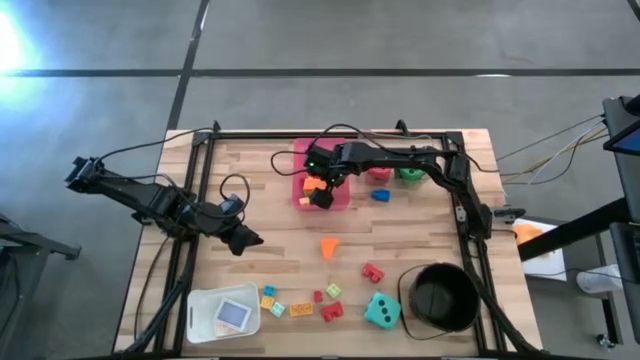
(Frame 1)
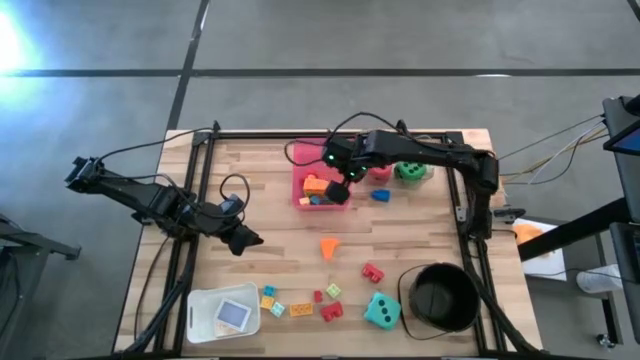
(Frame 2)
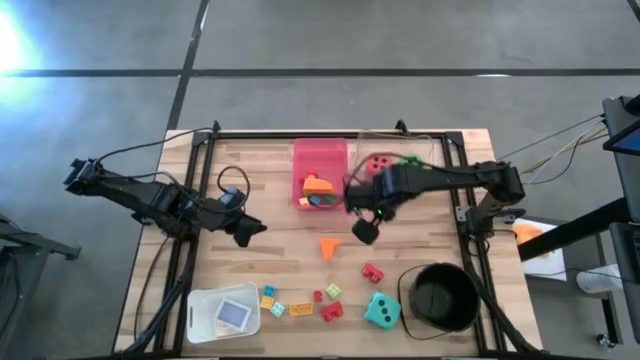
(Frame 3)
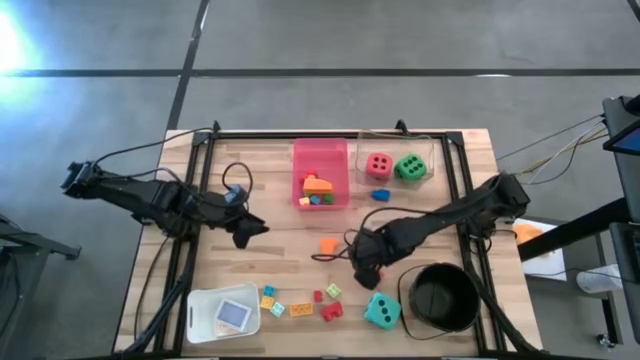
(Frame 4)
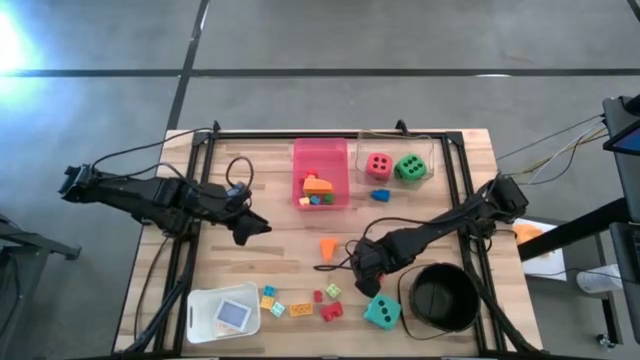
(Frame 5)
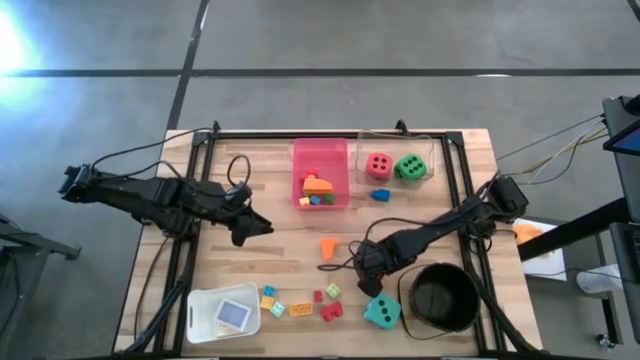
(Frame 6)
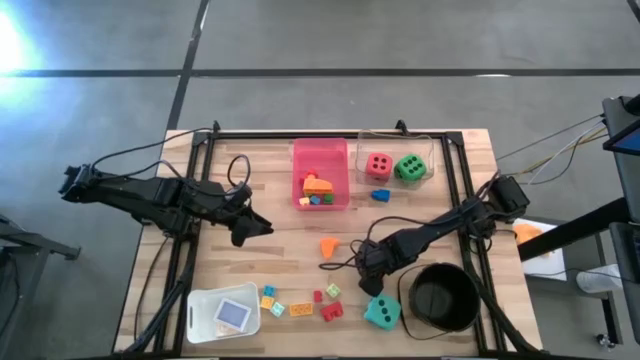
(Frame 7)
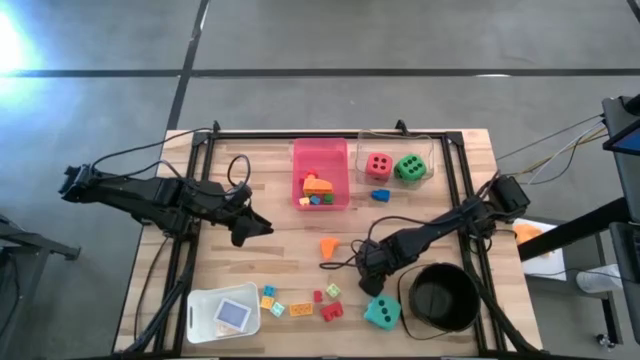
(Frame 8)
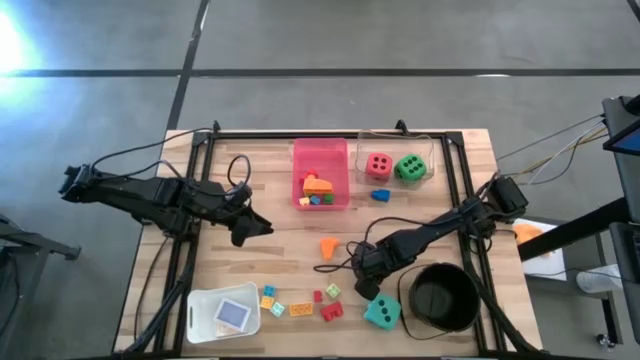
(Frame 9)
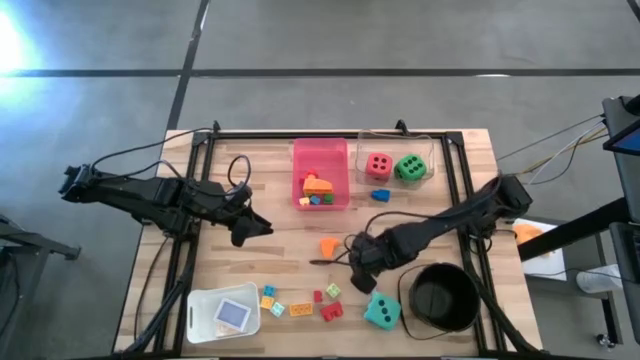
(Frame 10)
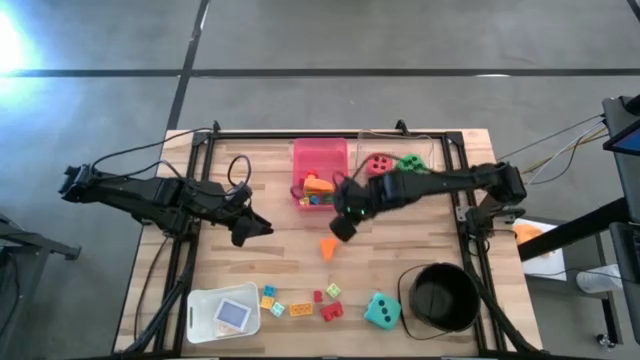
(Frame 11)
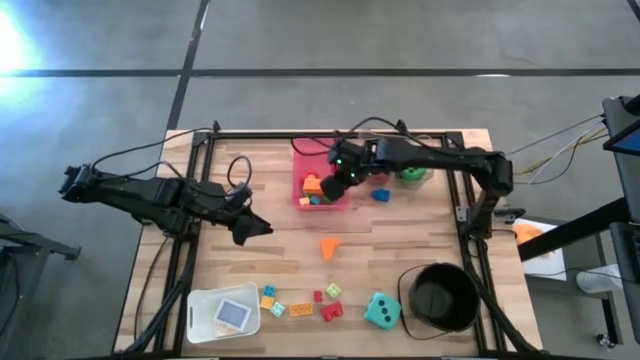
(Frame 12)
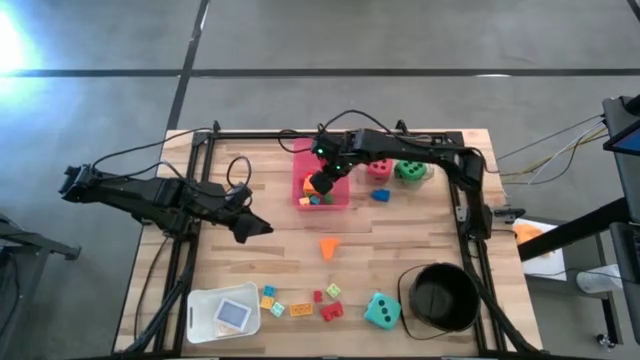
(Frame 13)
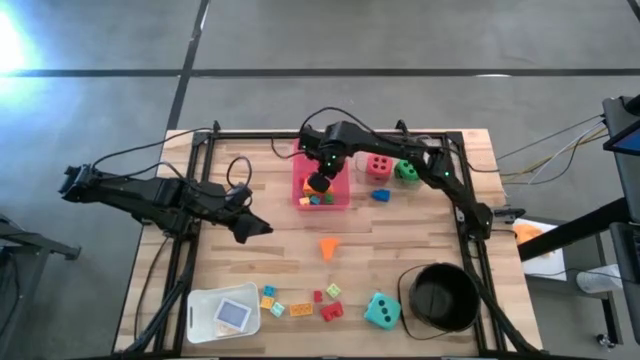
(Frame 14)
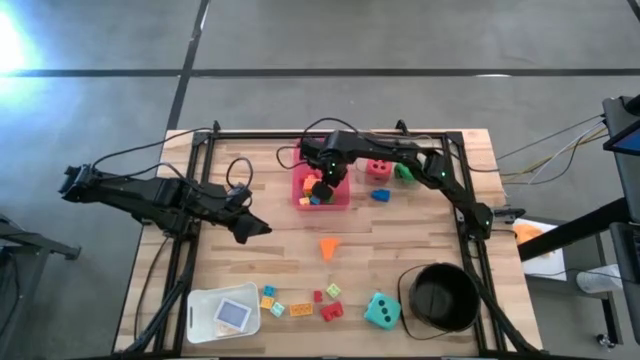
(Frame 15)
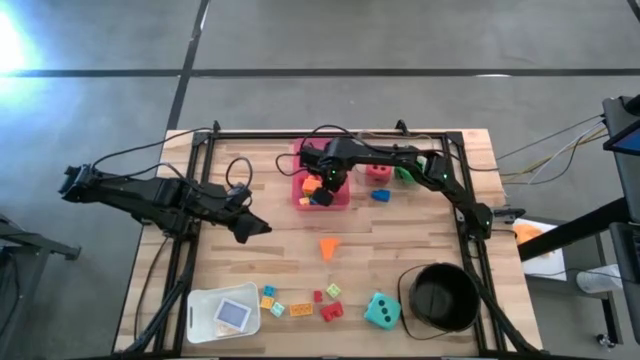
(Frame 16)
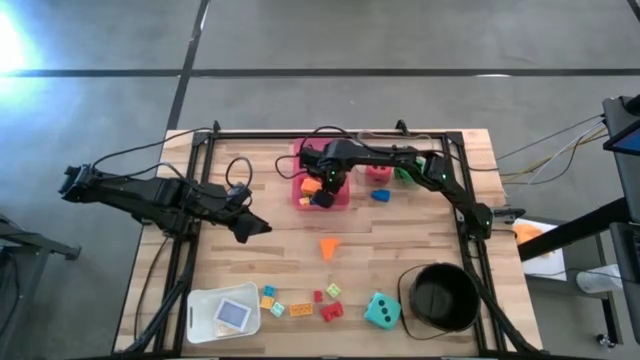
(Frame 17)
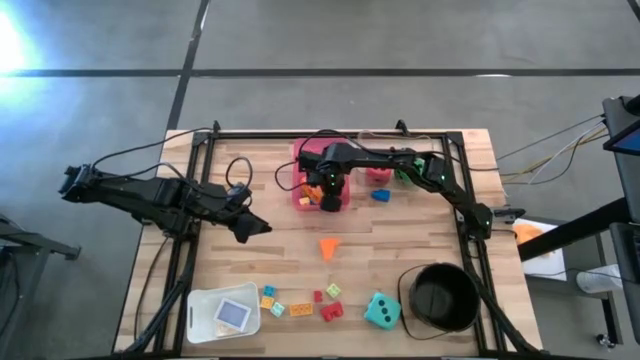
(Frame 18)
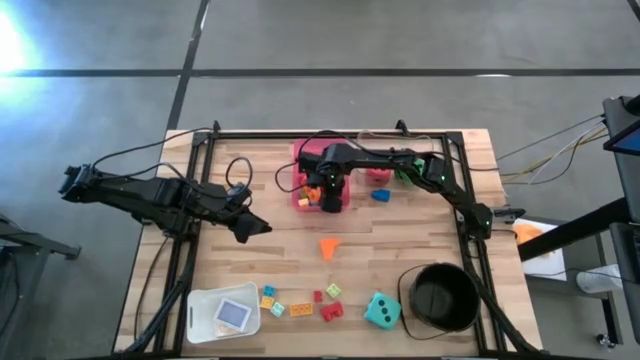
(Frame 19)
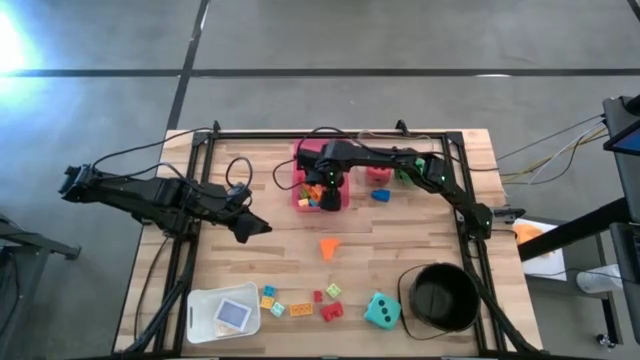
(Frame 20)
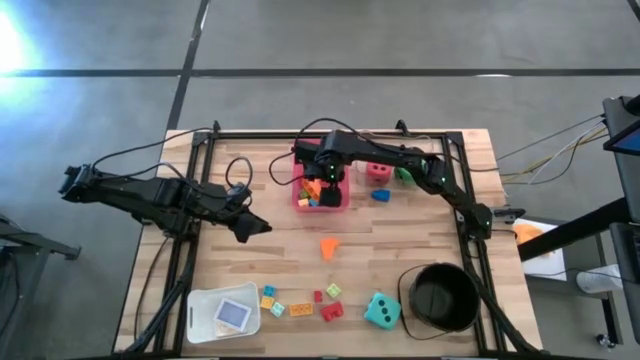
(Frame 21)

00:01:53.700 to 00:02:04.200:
Task: Pick & Place Toys
Put the red game piece into the red bin

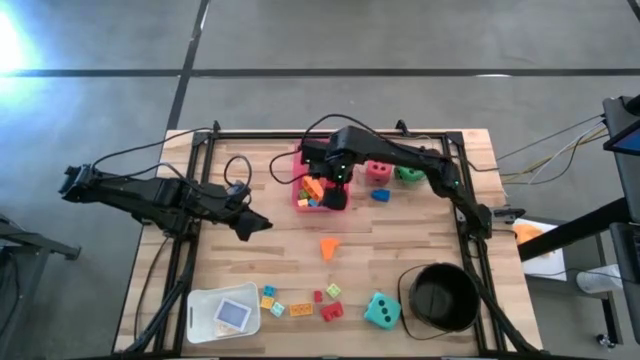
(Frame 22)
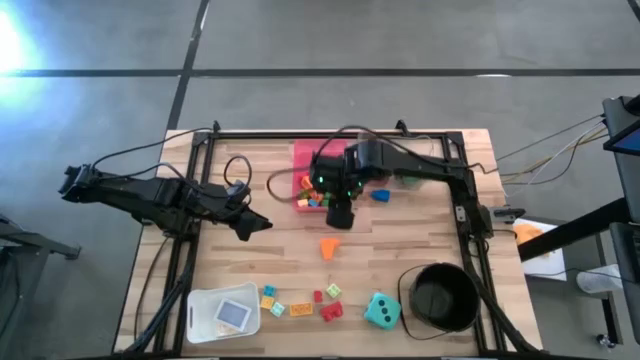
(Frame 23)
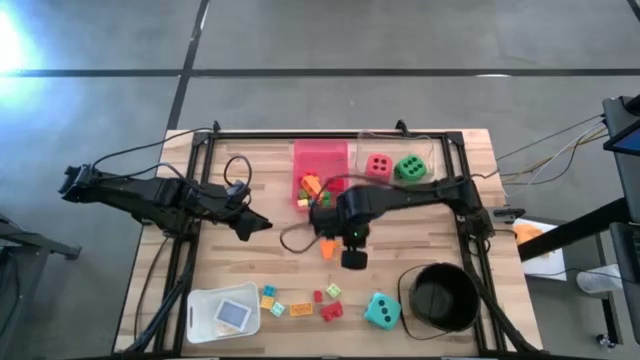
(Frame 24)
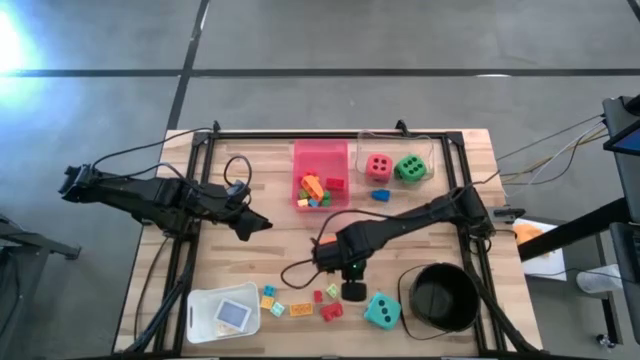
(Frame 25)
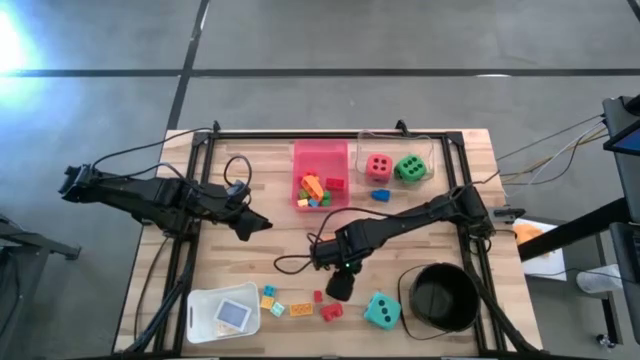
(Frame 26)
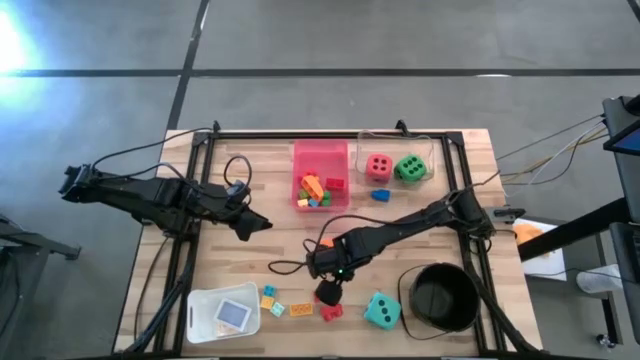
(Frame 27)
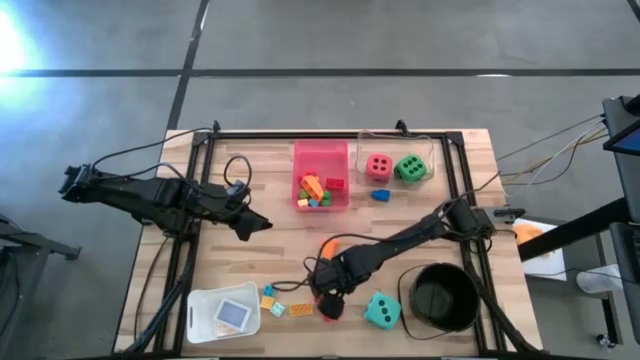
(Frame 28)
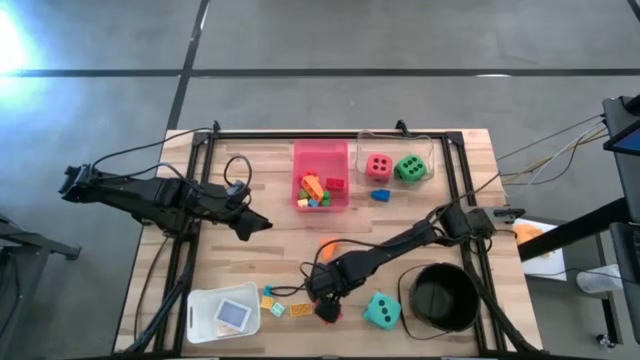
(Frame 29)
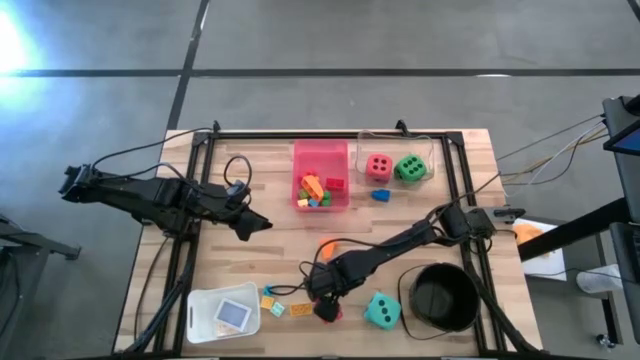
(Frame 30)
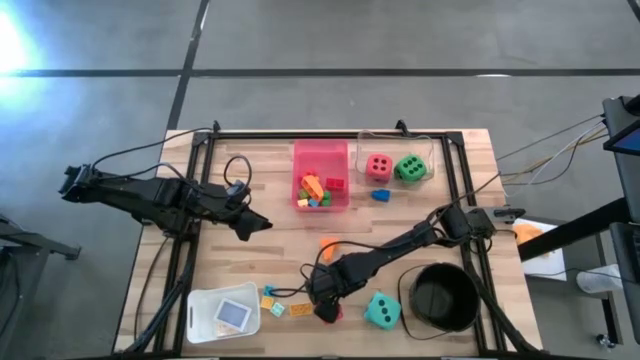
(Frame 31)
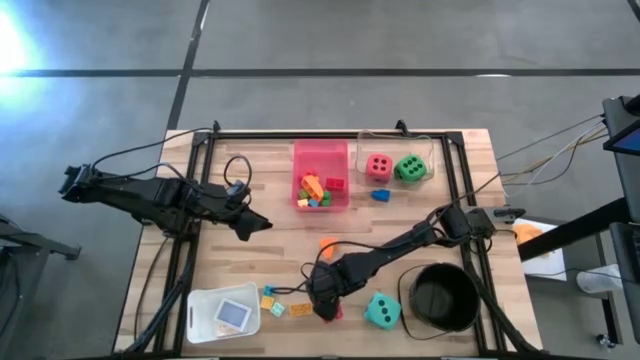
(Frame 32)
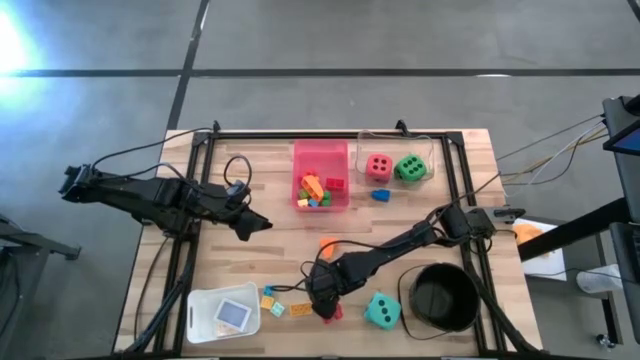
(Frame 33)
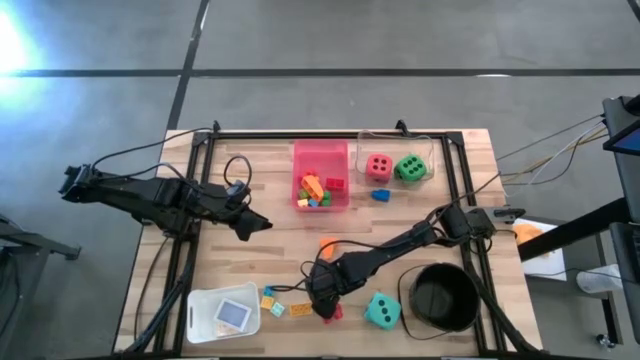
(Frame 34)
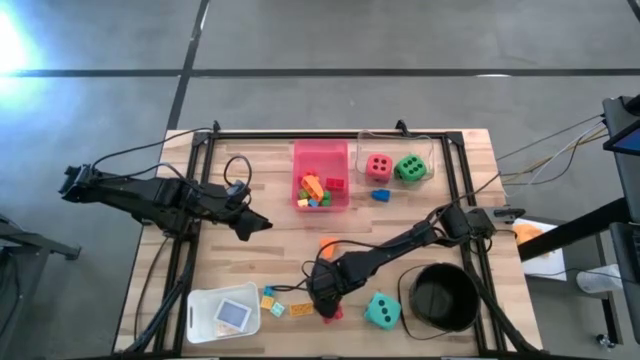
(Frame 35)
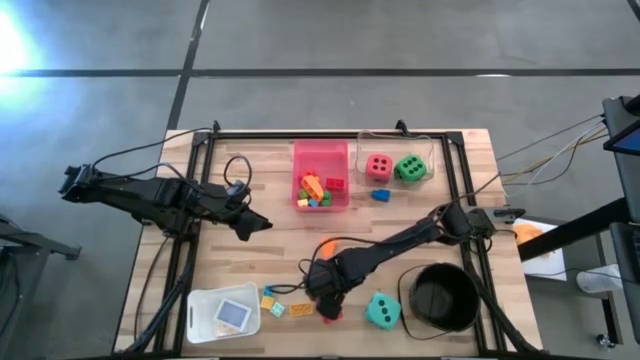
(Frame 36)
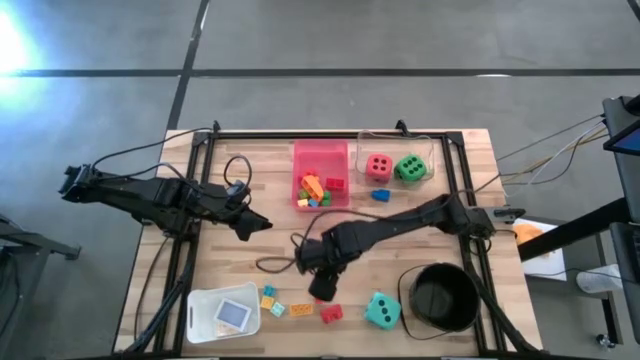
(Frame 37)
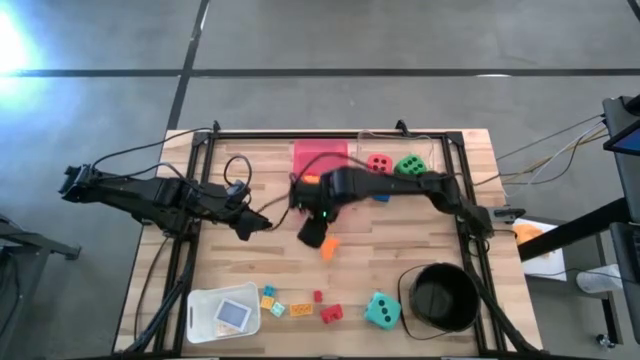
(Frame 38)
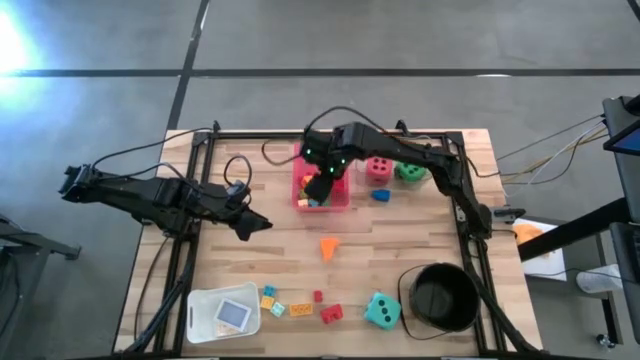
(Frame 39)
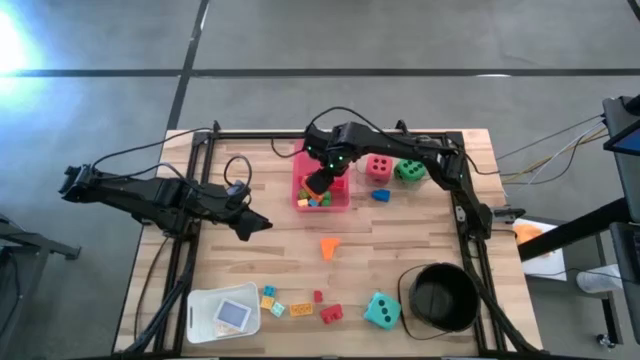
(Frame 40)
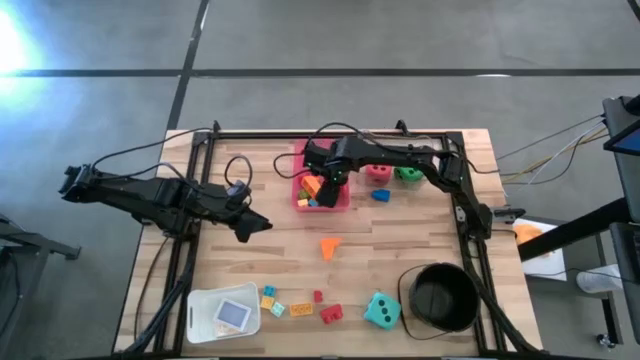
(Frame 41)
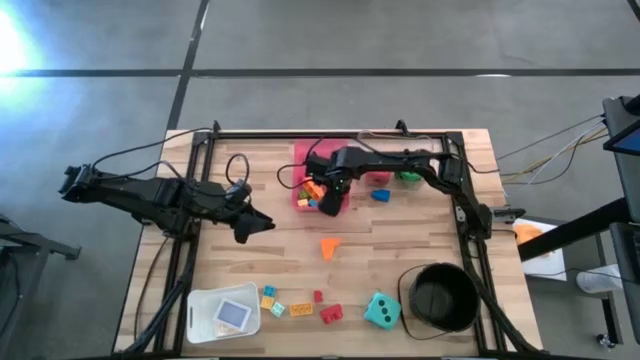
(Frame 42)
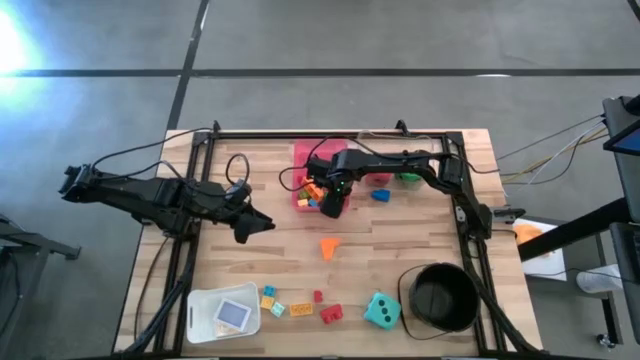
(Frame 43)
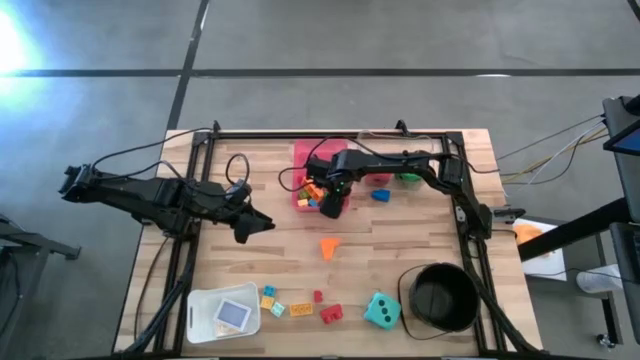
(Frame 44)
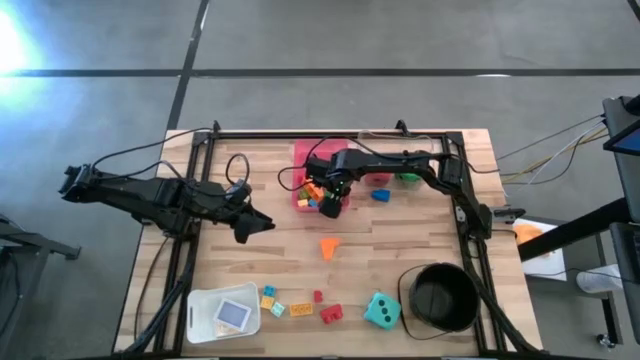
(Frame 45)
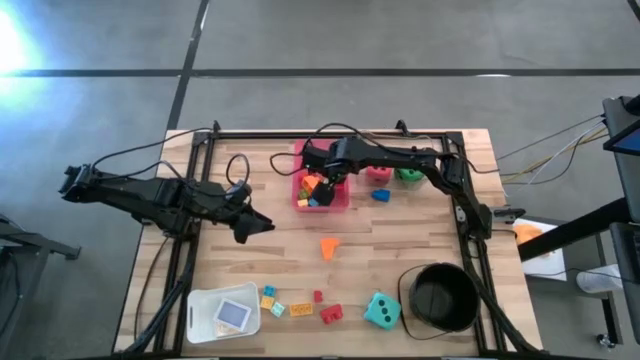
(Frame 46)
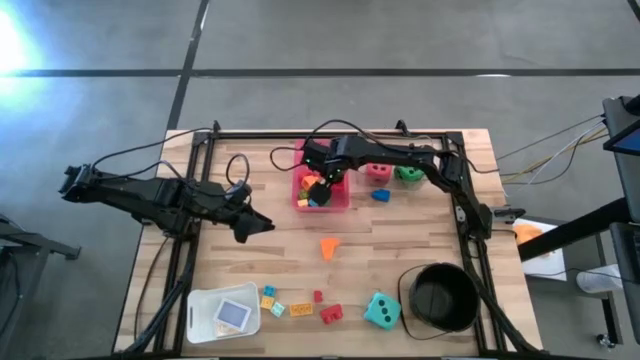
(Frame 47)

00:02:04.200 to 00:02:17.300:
Put the light green game piece into the red bin
